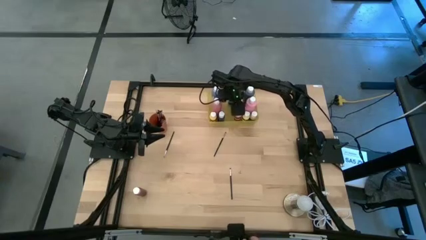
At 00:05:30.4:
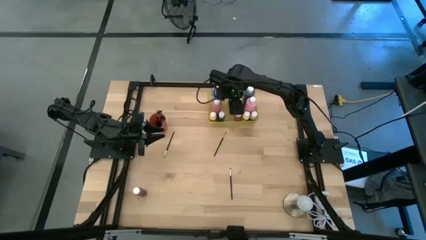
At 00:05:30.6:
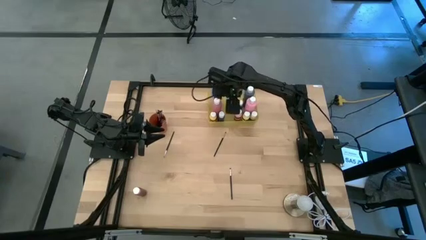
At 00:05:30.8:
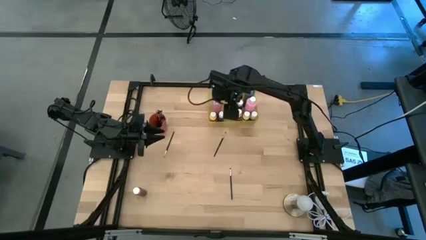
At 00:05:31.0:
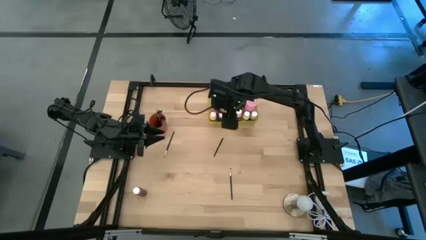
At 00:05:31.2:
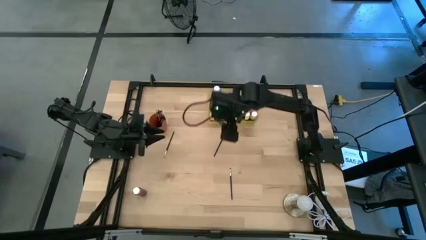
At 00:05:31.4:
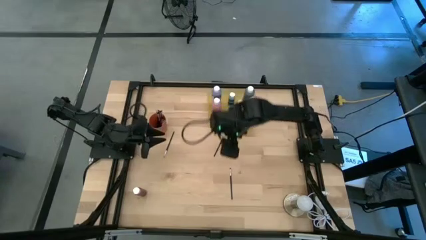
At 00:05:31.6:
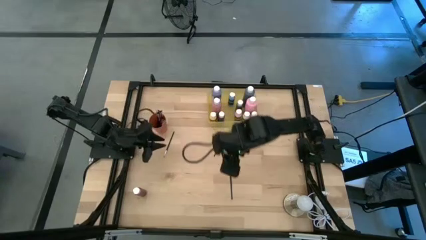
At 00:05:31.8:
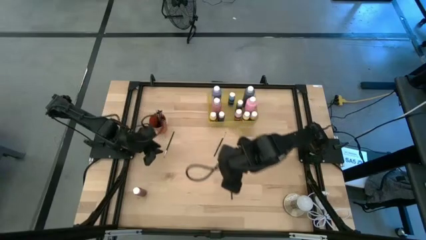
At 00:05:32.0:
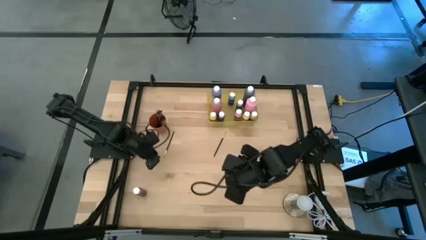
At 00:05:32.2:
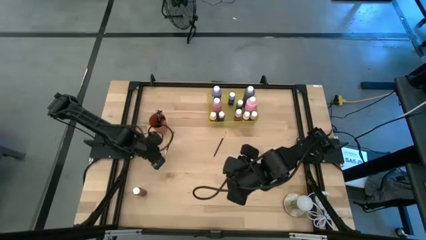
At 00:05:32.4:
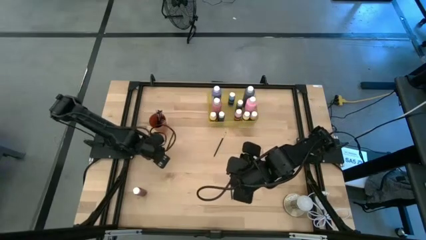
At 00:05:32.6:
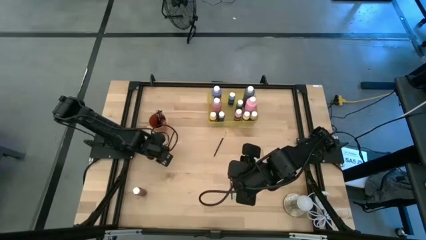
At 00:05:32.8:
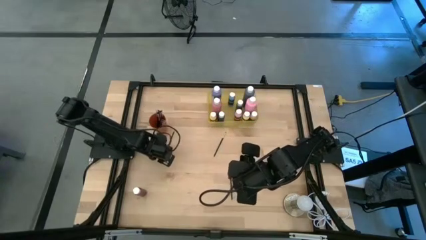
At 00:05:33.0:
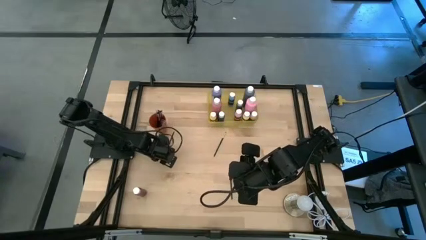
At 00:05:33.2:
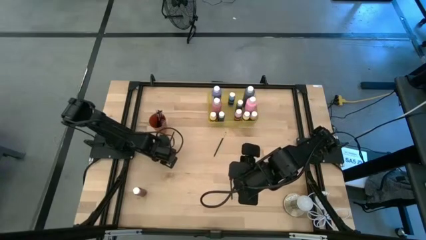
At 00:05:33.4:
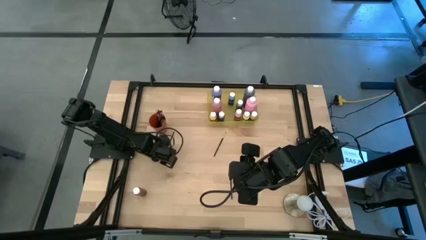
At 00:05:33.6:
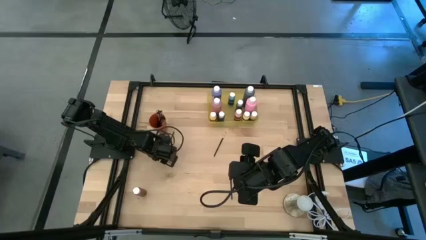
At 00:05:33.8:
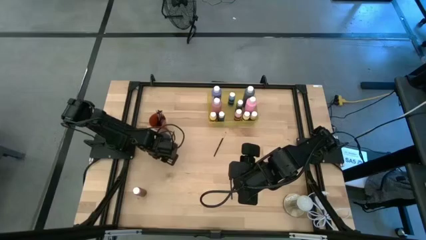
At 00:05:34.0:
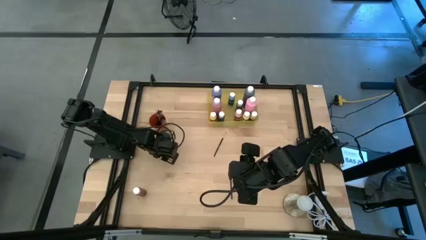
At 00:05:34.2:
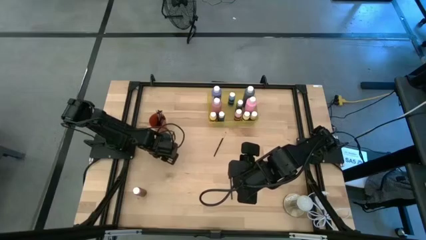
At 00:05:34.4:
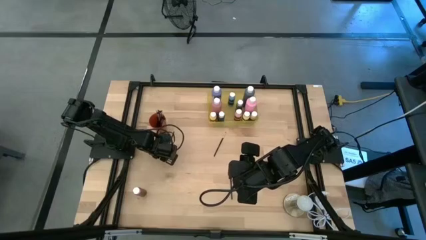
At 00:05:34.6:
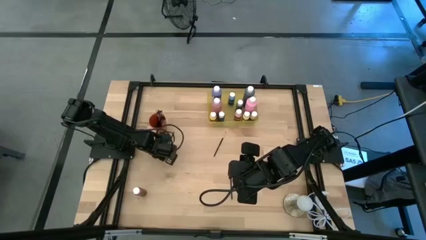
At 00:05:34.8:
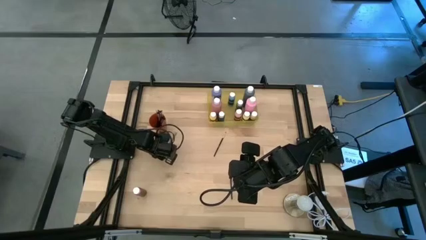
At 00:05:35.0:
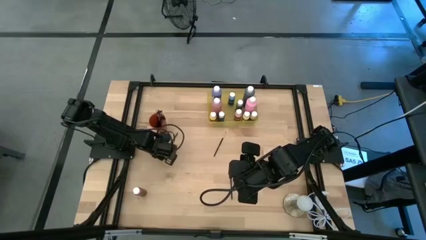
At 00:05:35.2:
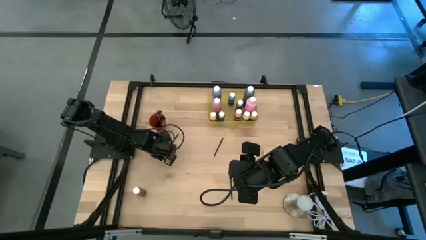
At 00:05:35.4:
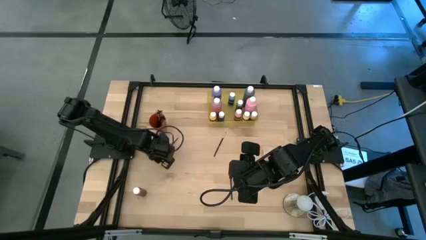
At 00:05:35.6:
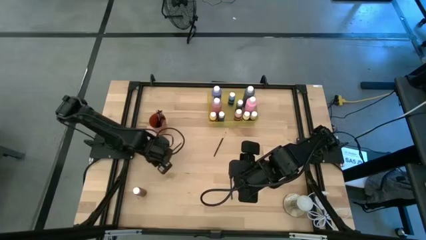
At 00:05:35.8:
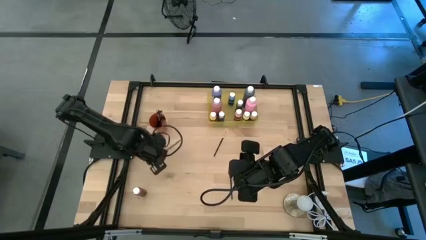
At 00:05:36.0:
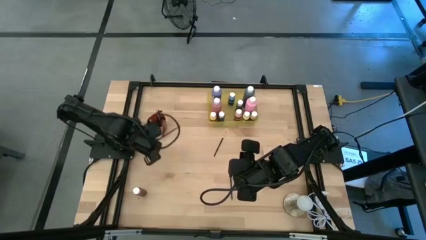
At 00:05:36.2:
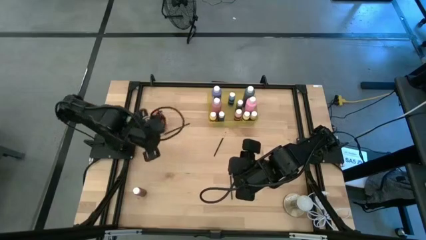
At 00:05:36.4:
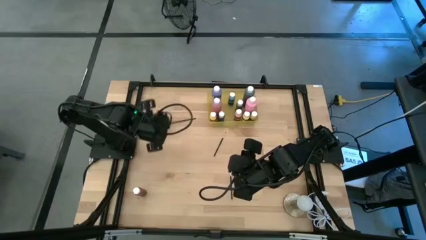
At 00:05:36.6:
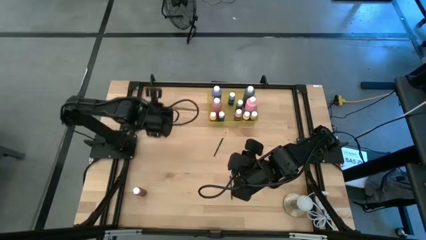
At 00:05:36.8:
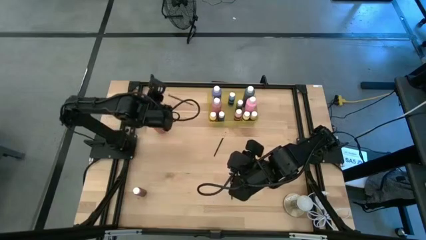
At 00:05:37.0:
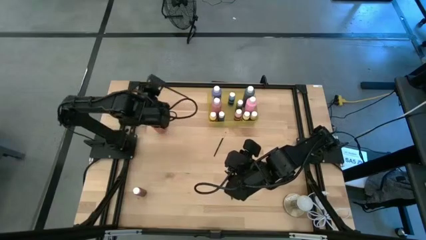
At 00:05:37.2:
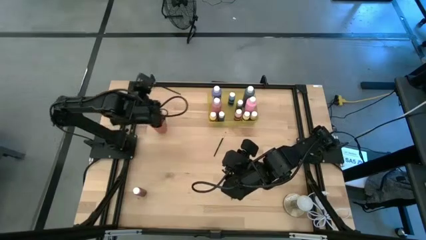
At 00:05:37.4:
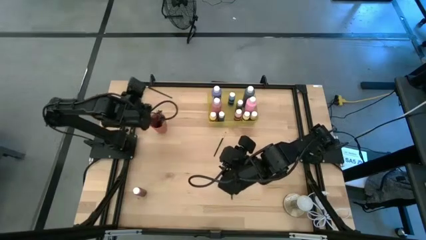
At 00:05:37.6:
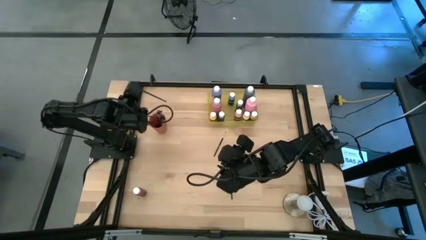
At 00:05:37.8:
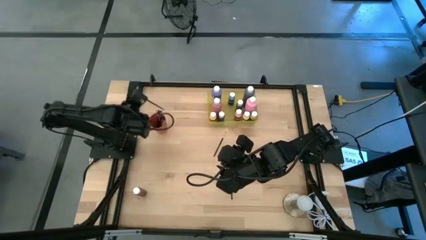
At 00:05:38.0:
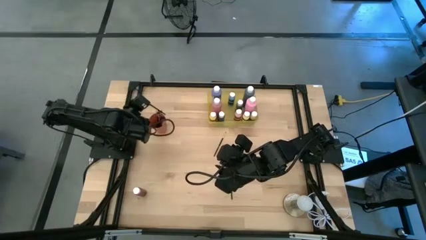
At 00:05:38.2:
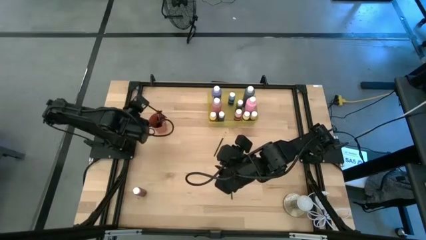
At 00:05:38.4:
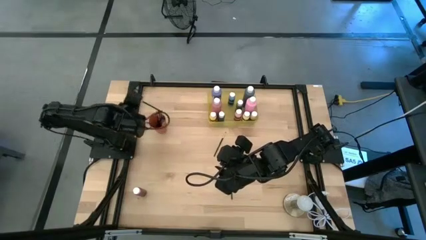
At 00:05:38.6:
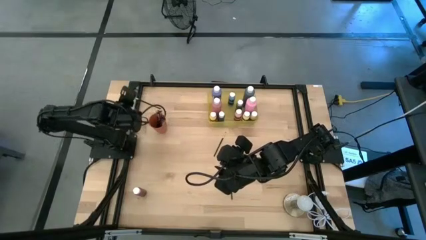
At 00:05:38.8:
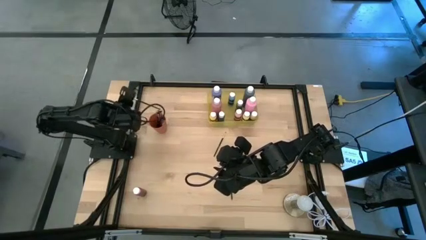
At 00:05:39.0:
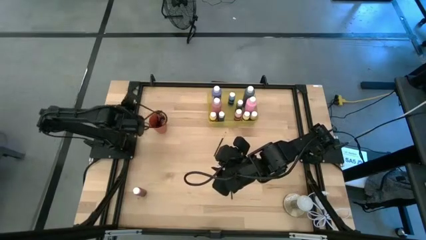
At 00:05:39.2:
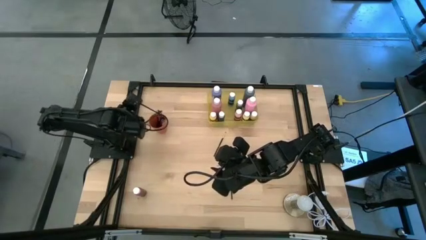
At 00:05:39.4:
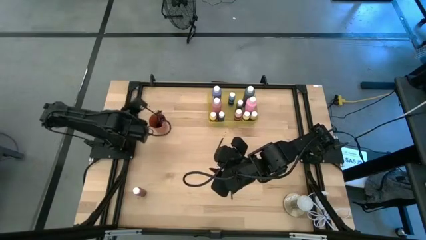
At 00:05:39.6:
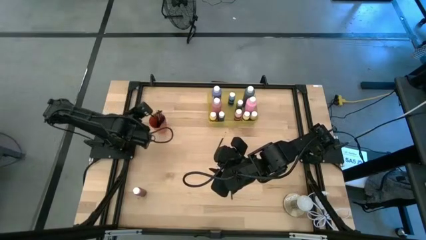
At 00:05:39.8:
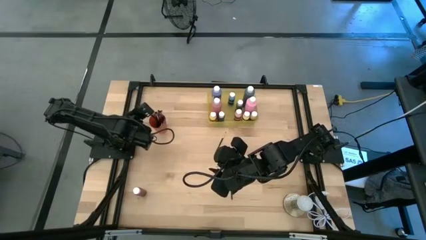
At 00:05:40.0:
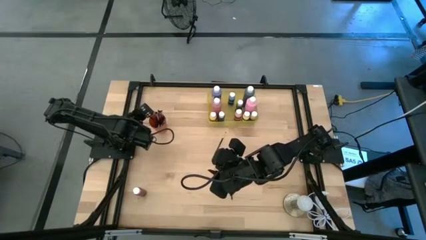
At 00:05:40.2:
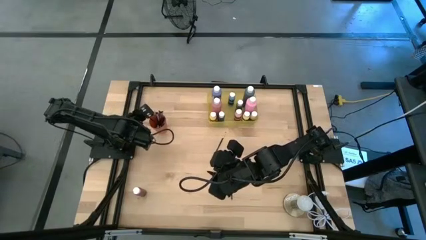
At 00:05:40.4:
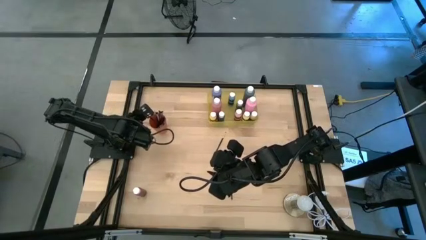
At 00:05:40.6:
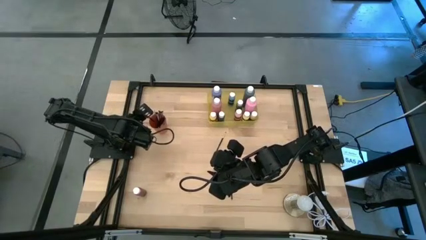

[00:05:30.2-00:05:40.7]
Task: Pick & Place Paint Supplies
Put the silver paint brush into the orange cup

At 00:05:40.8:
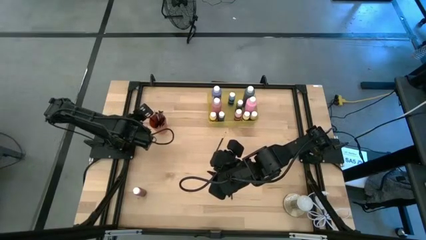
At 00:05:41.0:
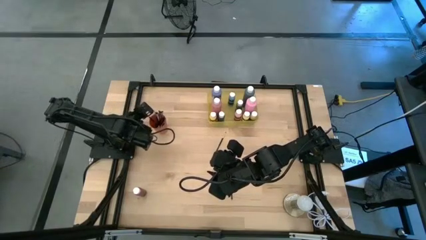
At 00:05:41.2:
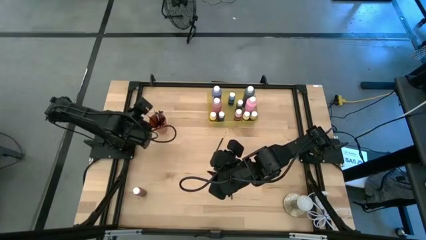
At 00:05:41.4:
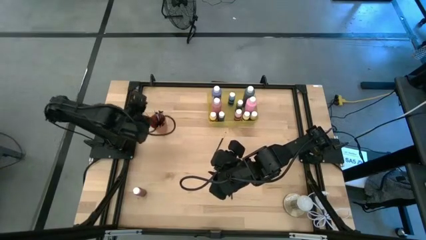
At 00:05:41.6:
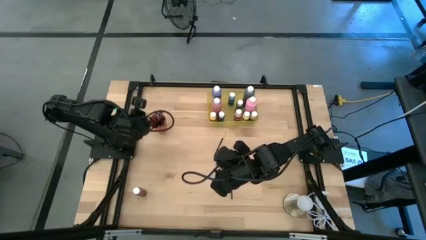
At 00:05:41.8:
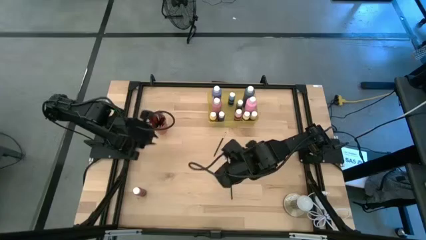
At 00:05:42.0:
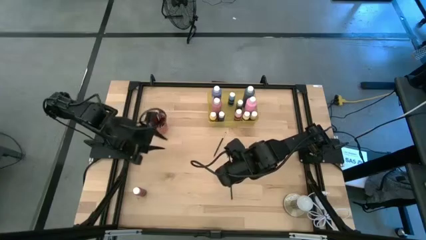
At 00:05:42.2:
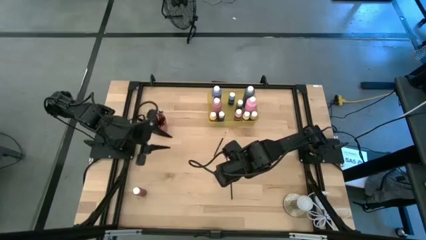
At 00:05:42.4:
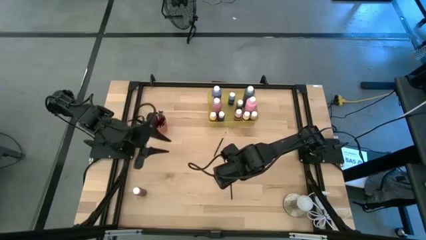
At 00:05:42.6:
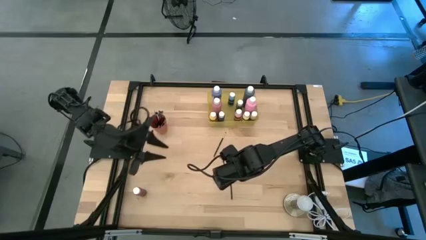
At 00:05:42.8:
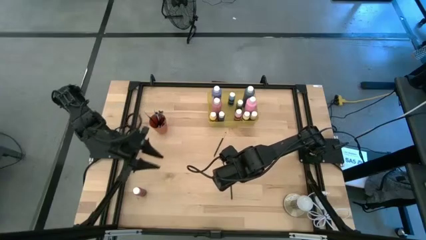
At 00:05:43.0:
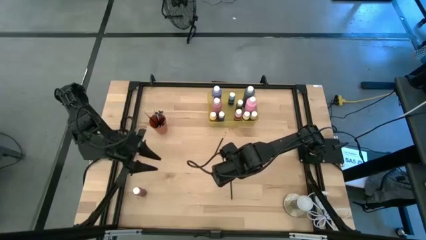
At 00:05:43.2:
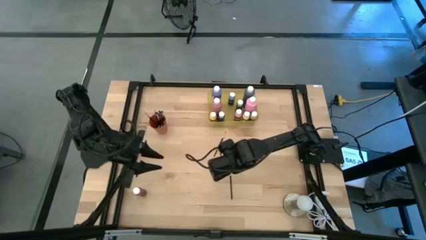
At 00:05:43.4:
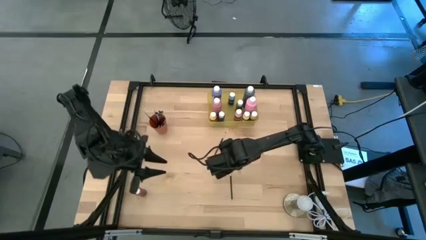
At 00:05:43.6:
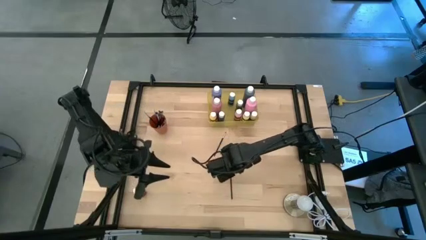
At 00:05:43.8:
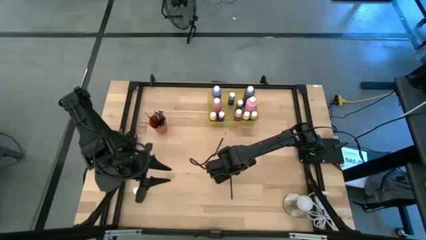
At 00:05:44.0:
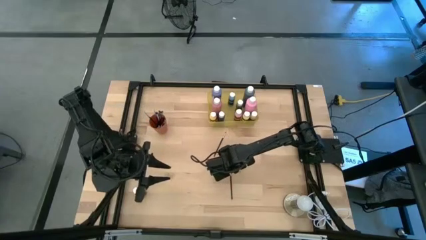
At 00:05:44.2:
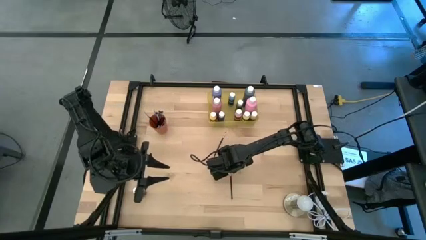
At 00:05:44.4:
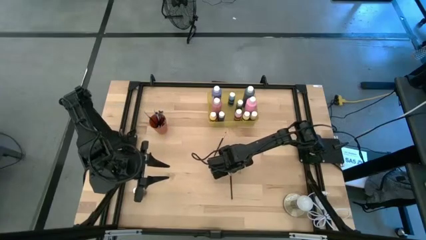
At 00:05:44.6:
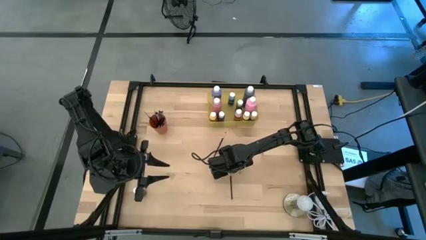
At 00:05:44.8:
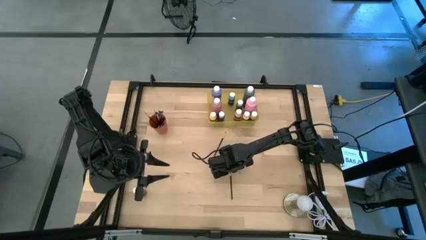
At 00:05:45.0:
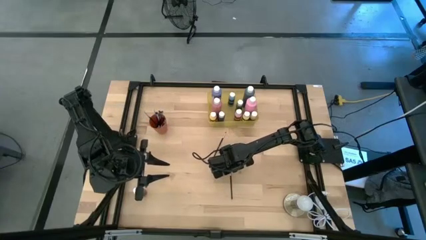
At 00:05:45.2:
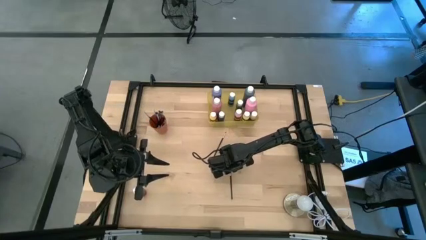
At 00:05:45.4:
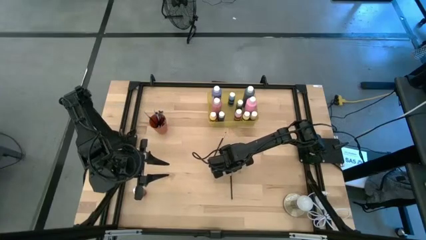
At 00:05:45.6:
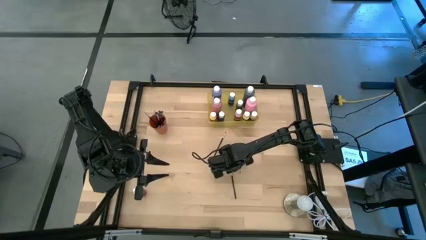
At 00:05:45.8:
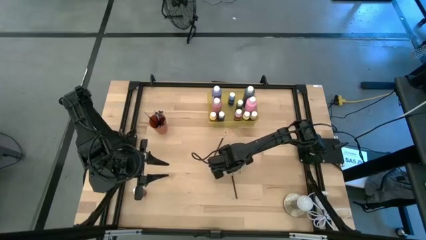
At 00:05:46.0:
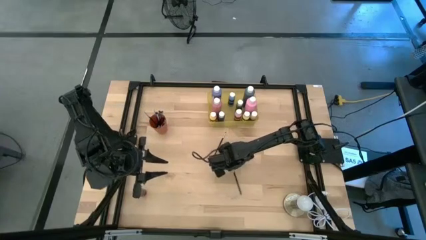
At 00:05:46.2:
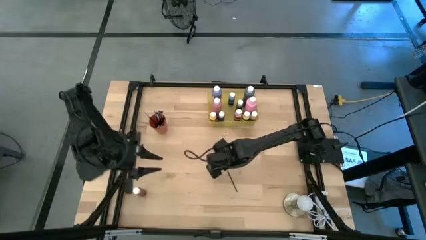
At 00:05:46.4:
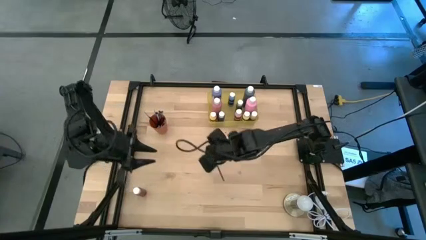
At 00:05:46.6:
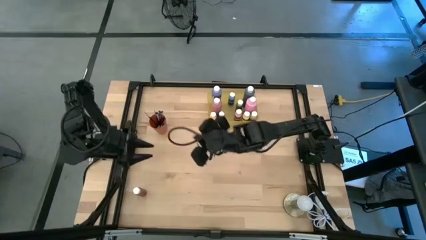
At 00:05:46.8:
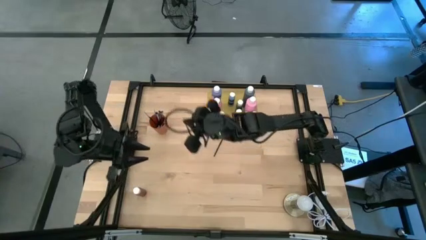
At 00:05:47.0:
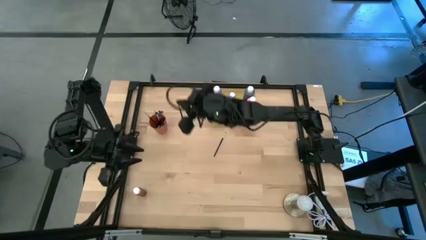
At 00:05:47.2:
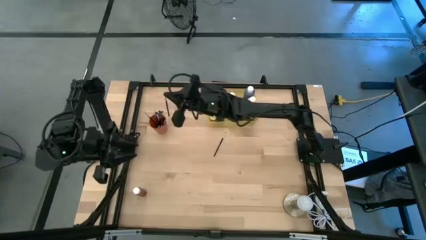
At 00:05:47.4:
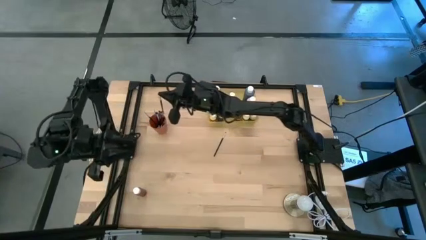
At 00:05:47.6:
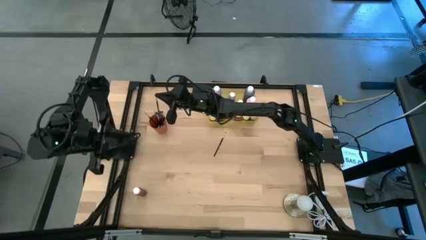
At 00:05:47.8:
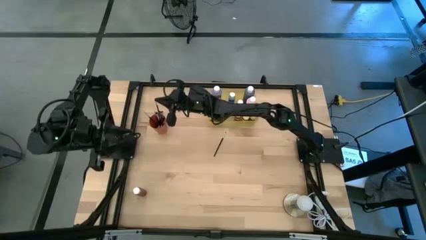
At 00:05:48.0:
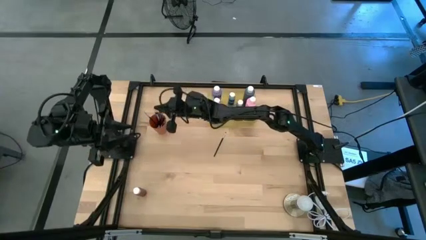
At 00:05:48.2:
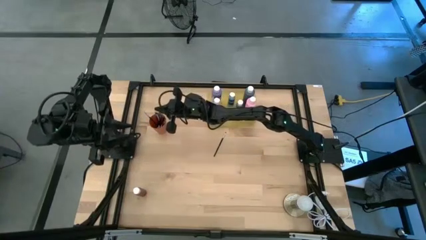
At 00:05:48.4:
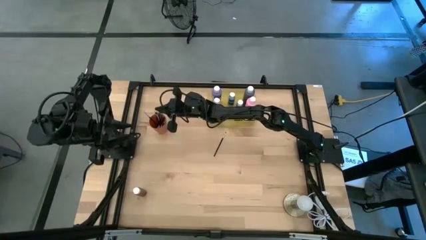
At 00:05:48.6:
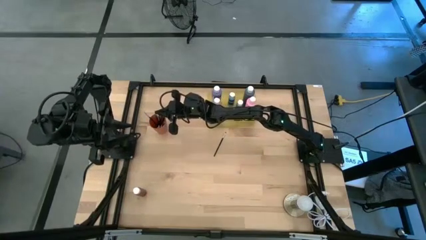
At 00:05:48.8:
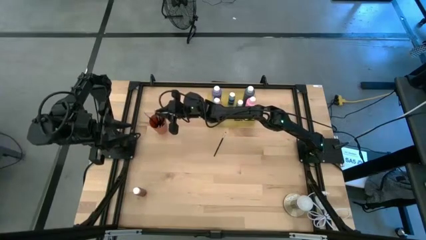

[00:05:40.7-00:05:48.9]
Put the silver paint brush into the orange cup
